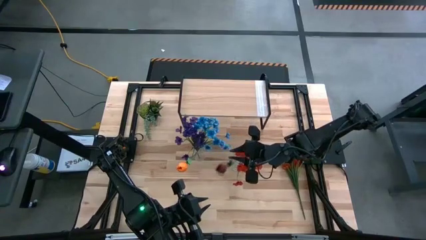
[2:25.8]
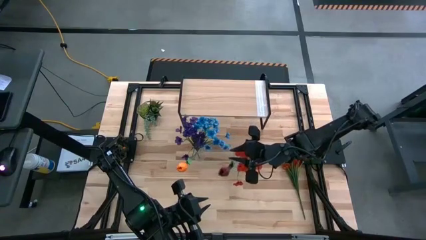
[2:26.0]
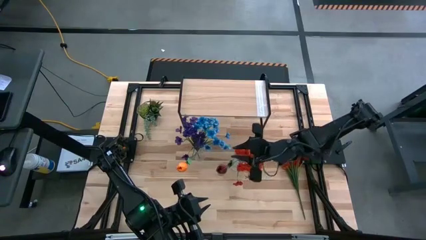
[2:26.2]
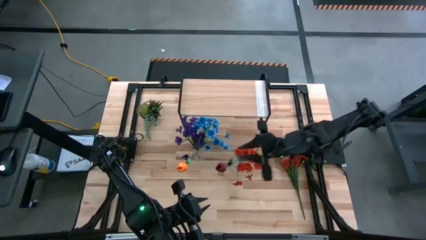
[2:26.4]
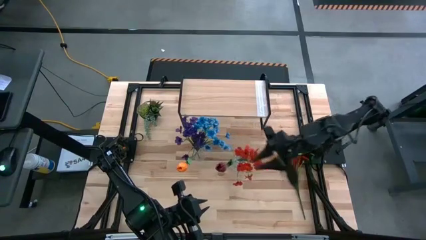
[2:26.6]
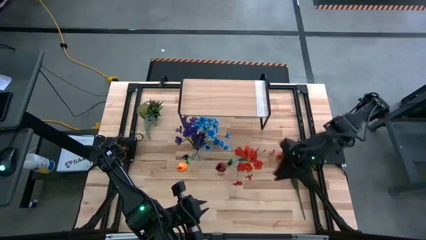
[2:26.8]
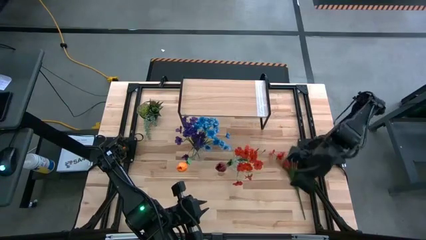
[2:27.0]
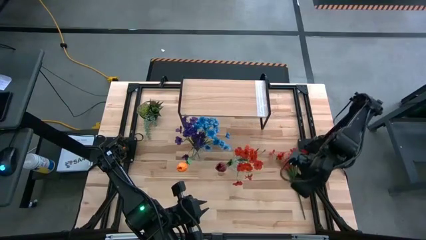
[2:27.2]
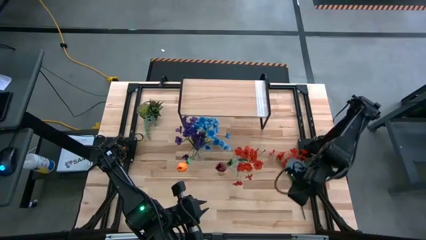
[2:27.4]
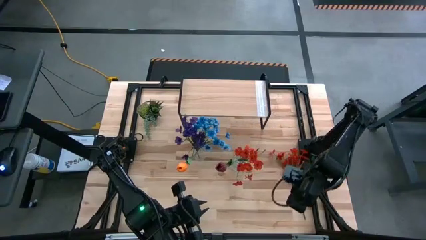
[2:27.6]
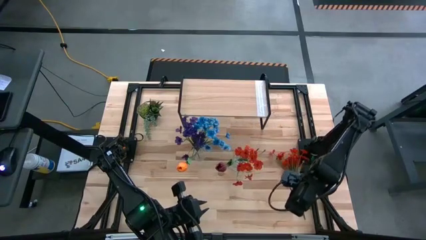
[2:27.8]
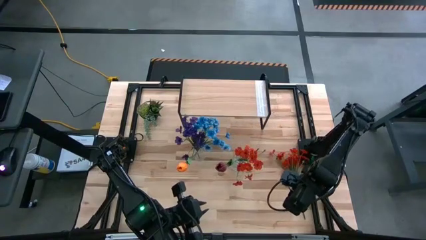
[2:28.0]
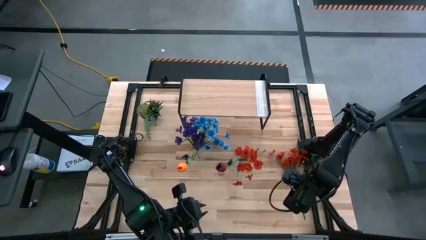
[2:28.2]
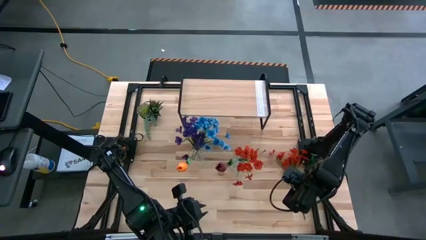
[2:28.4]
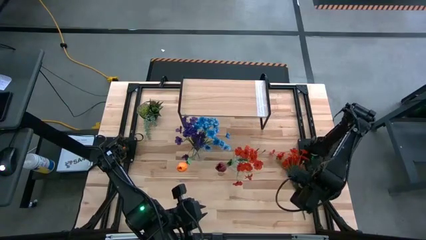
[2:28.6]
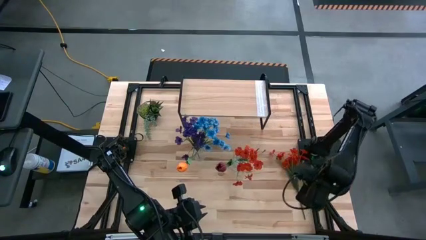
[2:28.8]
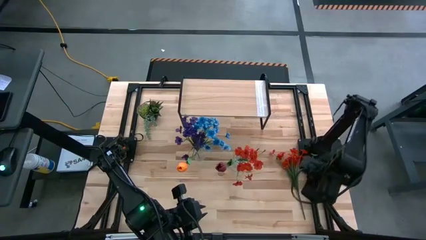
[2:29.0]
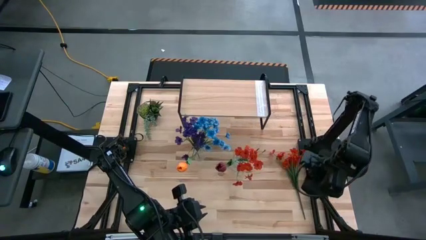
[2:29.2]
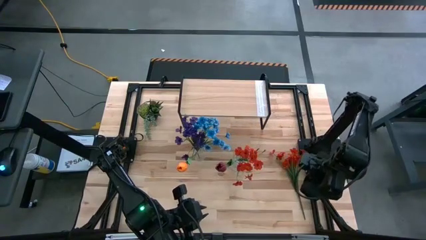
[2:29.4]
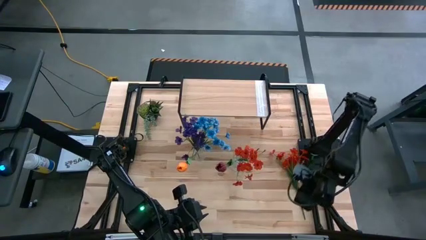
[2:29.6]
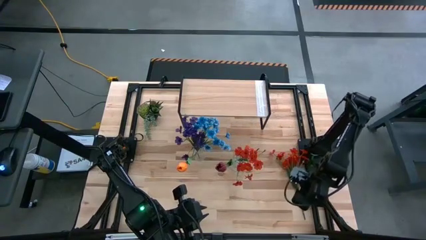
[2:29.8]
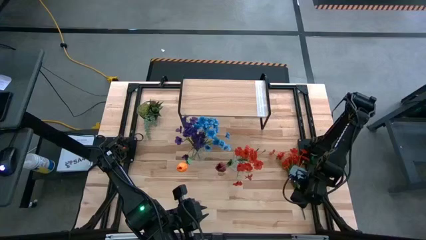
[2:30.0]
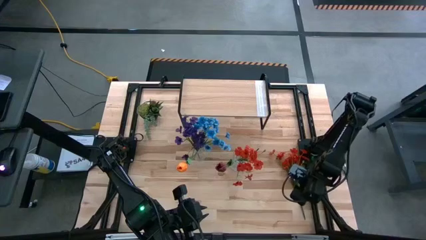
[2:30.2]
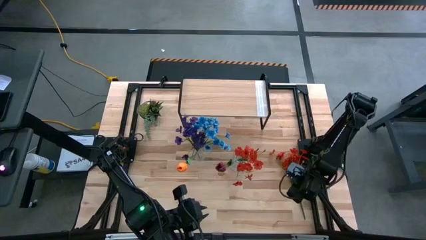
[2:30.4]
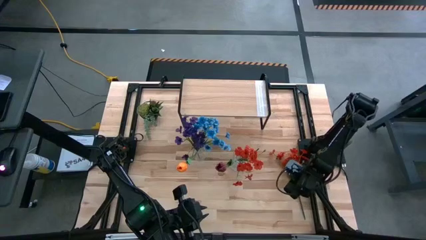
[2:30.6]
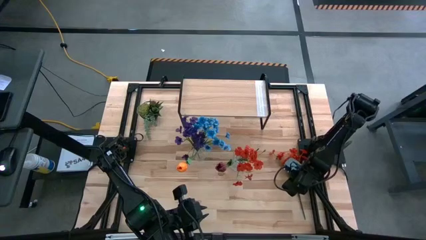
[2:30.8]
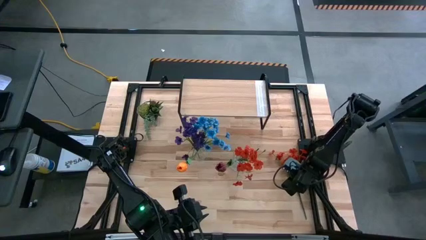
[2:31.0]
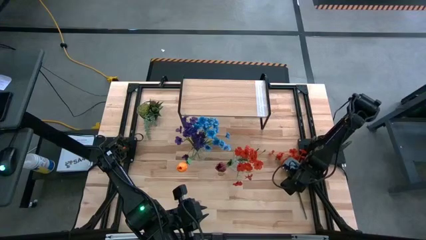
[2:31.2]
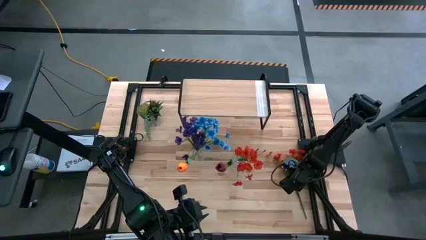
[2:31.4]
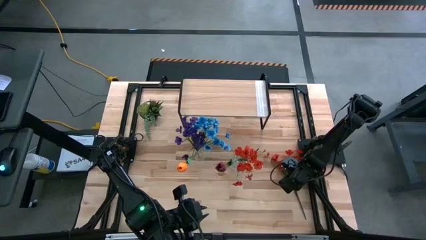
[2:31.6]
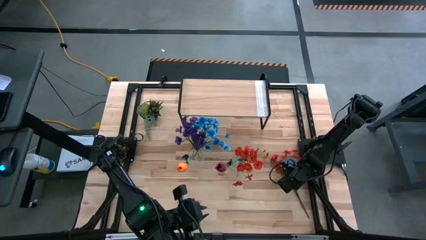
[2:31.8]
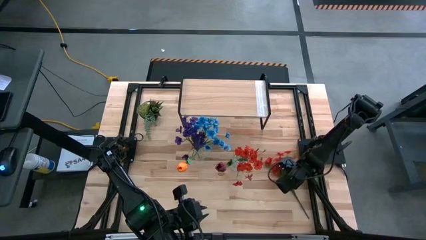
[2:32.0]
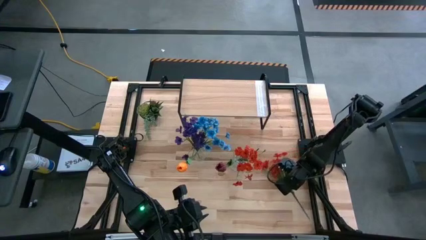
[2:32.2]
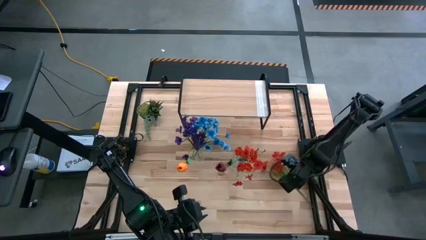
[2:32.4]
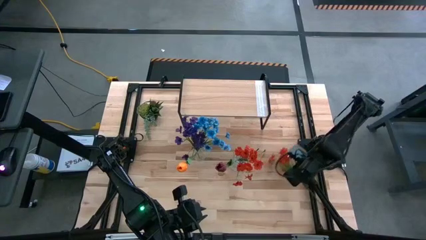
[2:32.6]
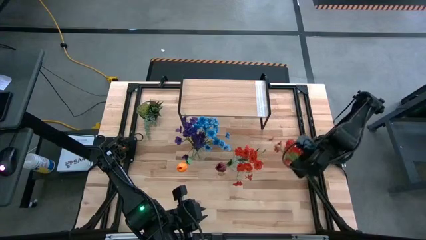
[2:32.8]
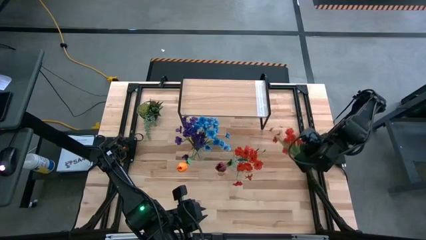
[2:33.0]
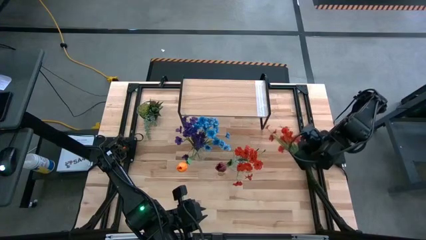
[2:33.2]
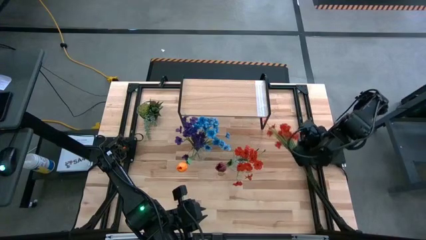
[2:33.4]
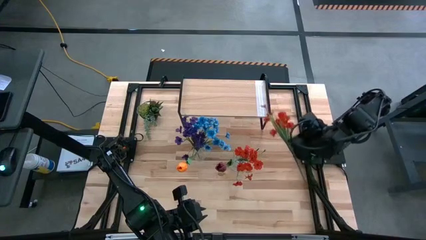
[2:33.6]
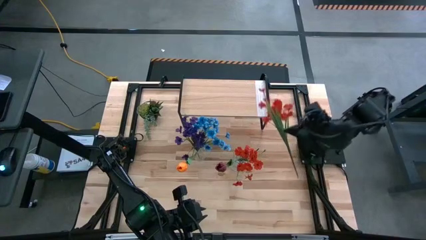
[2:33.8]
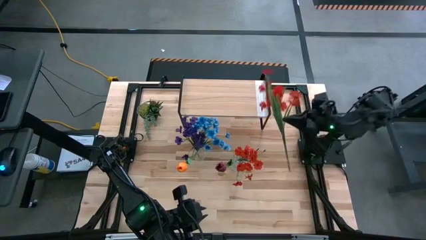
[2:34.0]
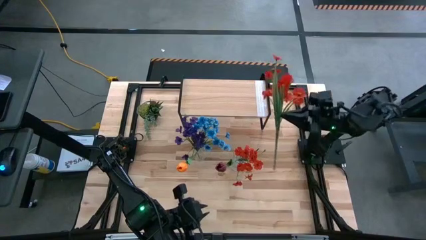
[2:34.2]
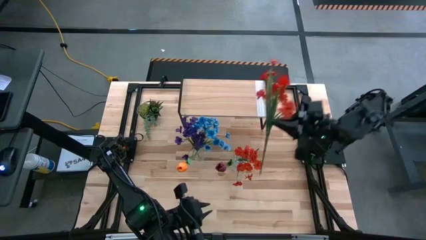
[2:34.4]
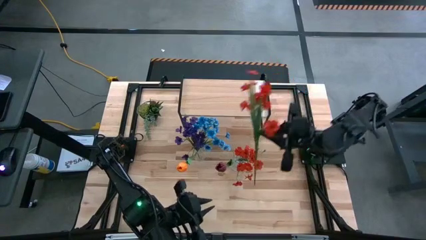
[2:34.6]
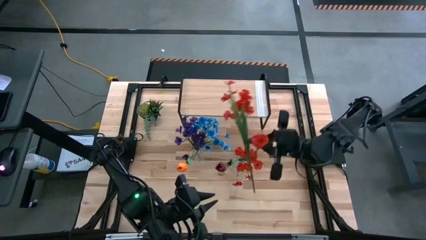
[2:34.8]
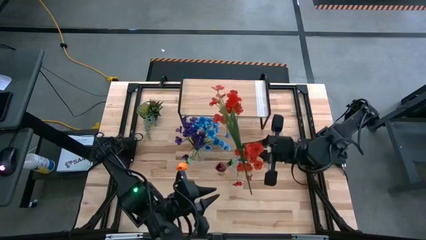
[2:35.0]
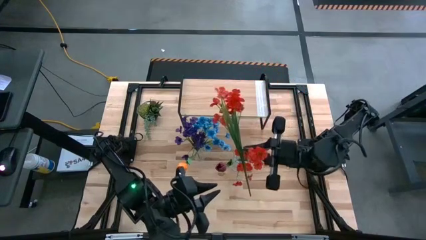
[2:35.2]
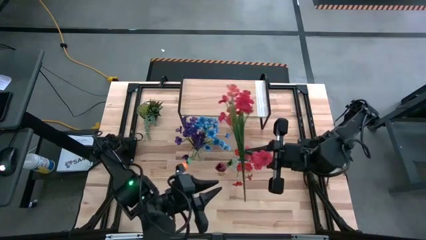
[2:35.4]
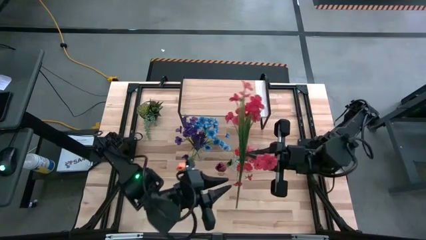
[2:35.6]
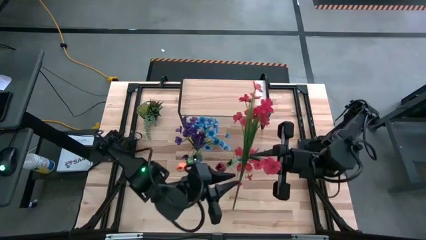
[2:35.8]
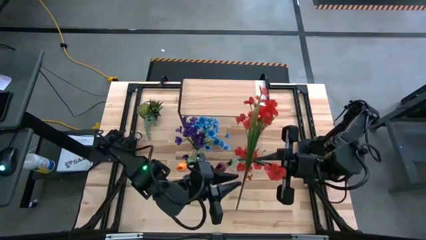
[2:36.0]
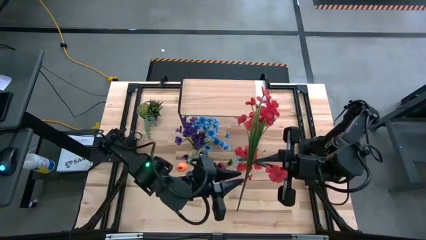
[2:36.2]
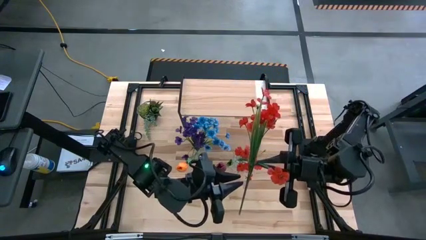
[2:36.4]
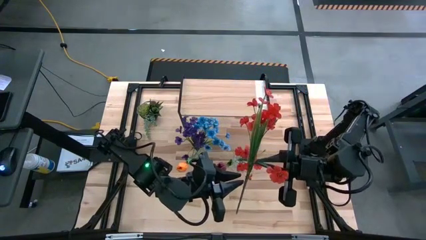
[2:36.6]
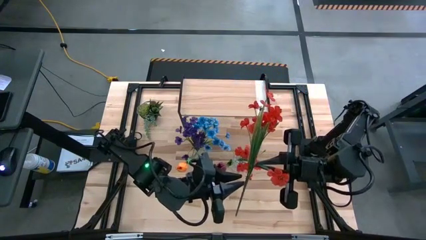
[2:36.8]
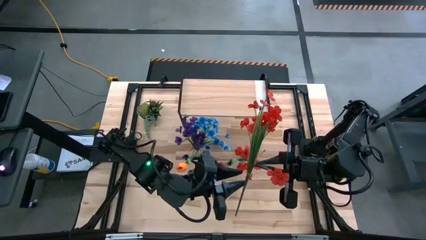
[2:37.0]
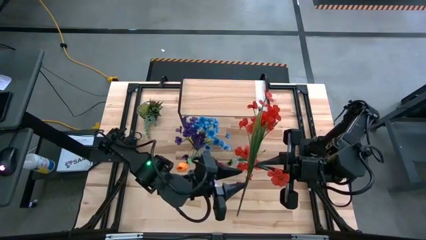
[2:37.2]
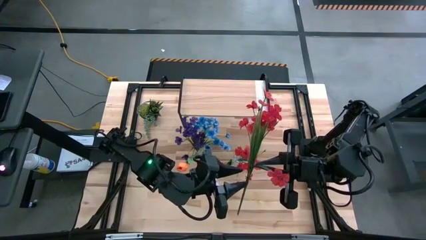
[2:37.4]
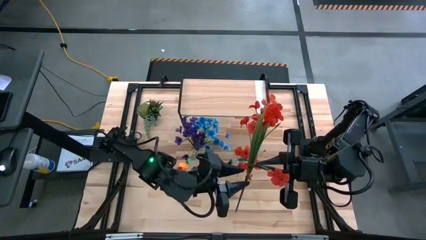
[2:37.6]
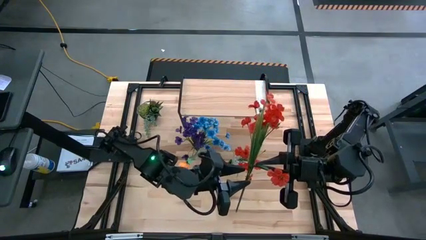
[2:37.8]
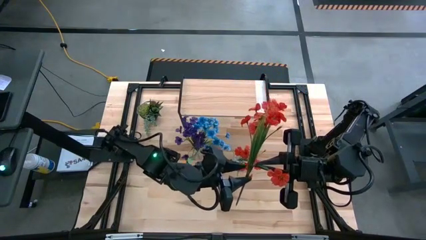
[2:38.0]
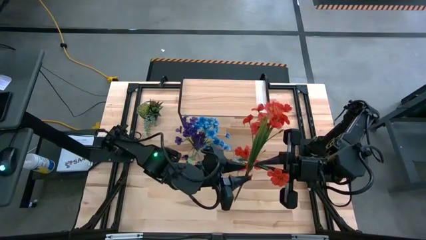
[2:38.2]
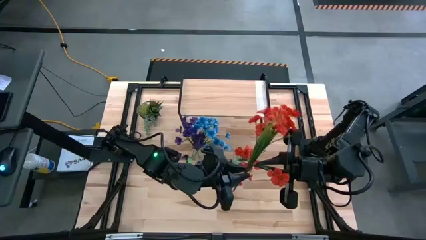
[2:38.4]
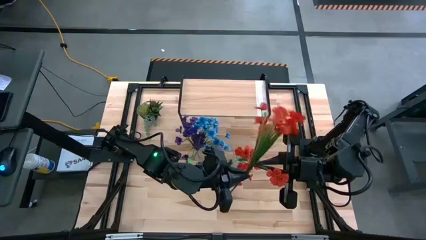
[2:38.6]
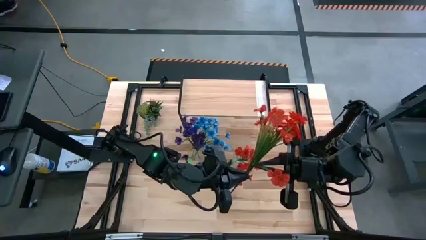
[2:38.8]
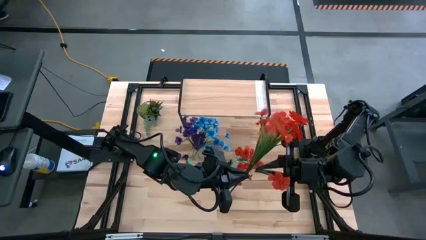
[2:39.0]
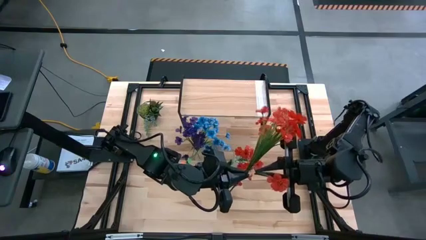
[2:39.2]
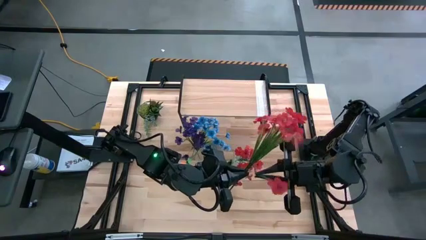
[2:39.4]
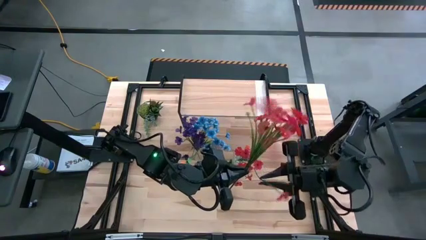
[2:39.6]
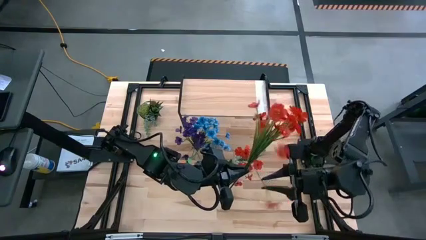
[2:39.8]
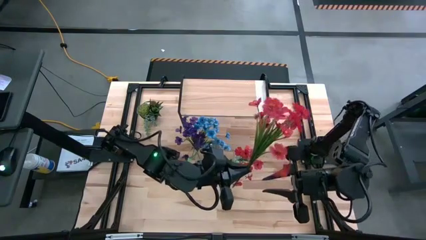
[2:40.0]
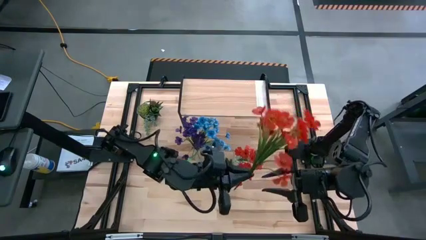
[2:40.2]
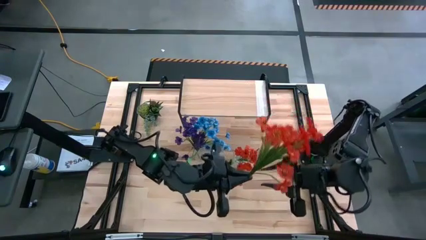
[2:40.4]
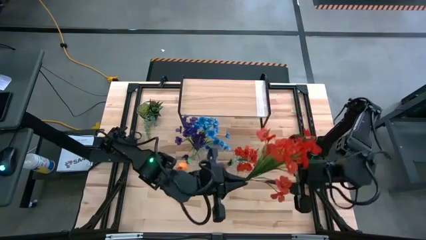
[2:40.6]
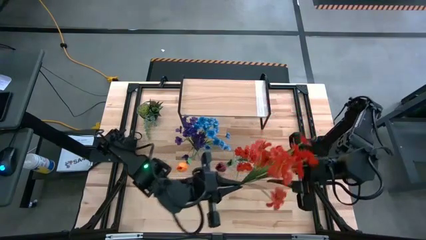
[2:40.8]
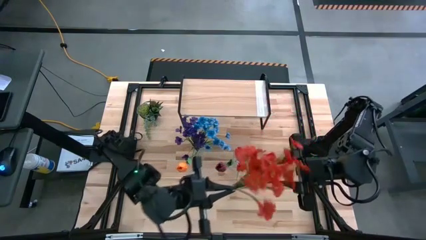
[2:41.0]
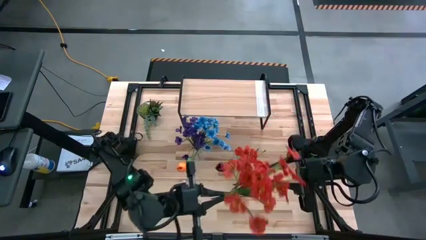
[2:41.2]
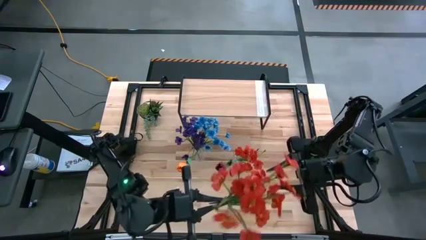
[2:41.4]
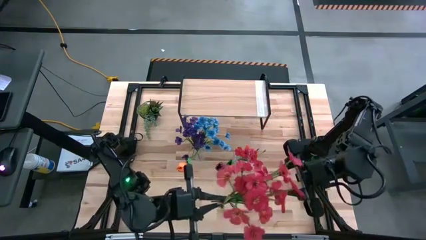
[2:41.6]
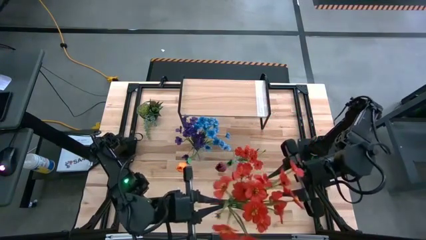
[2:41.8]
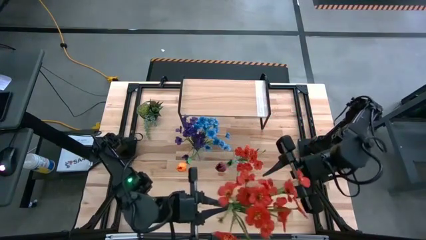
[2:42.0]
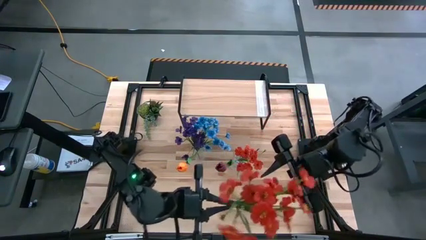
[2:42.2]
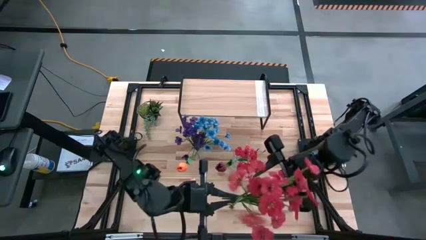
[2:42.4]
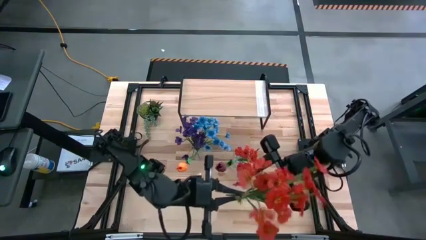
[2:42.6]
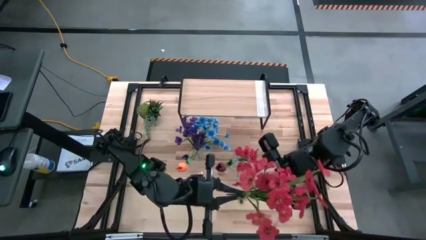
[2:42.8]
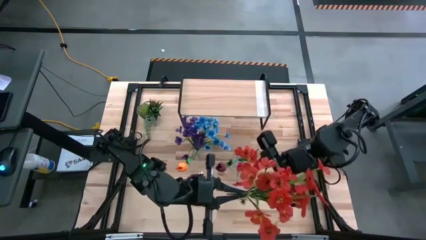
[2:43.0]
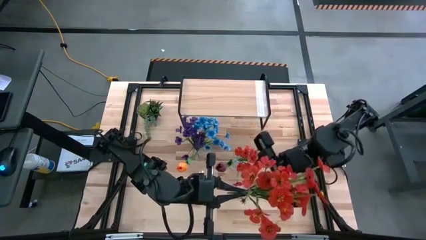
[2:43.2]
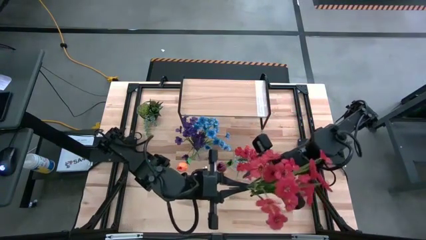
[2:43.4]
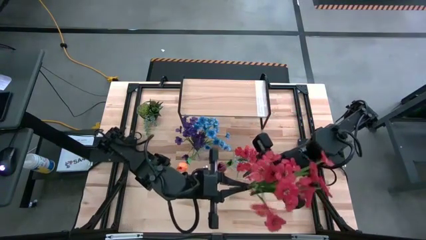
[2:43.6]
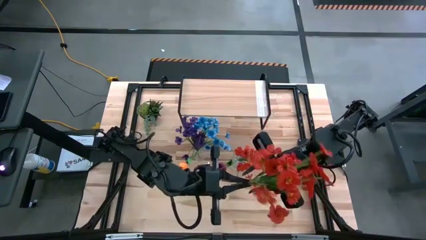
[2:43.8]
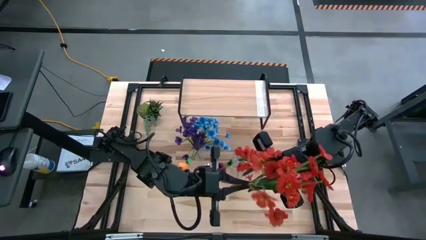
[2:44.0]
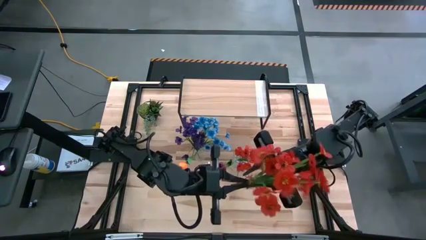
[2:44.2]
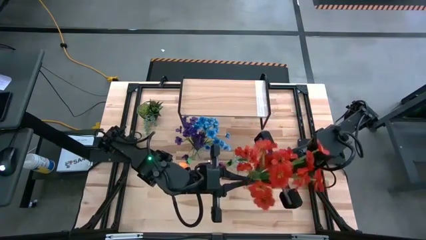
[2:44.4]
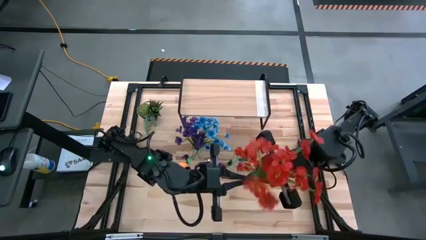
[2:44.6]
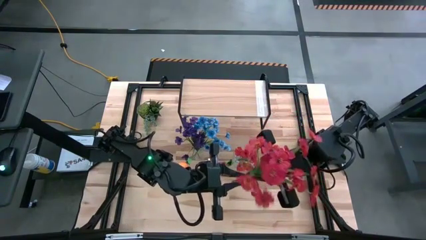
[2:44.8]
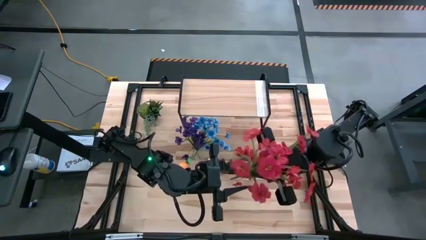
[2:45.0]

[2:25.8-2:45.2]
Task: Pick and place flowers into a vace then onto a shelf
Put the red flower into the right transparent crystal vase
